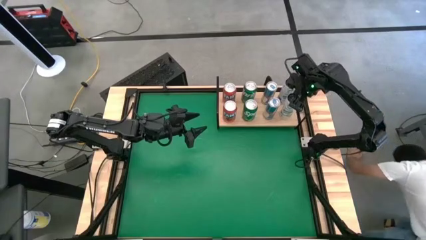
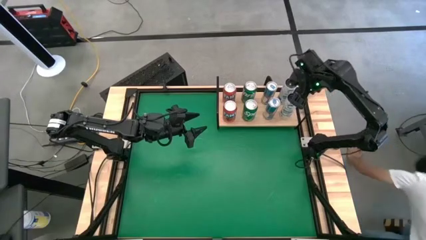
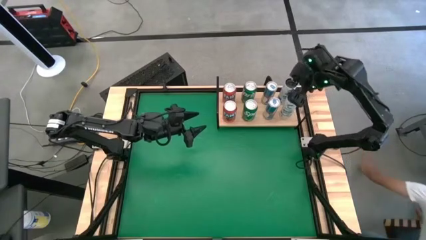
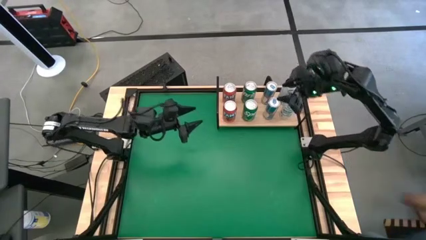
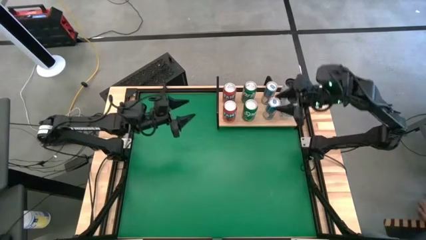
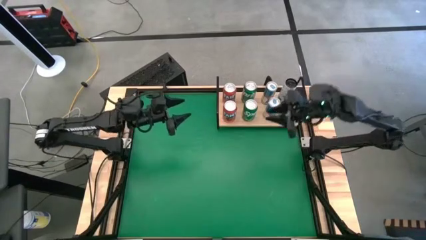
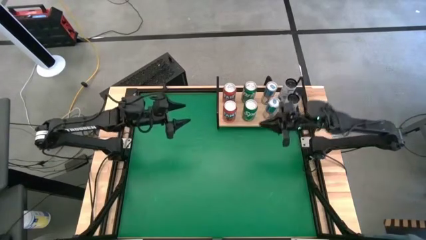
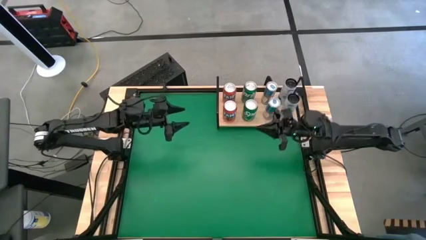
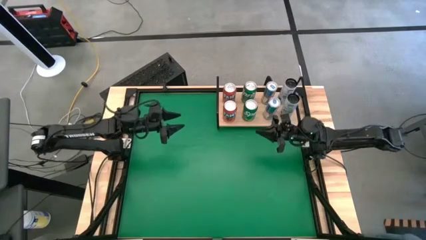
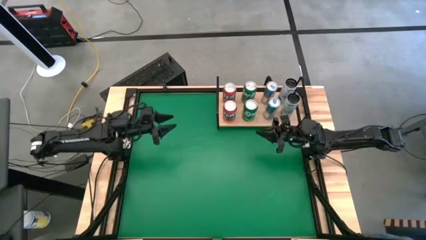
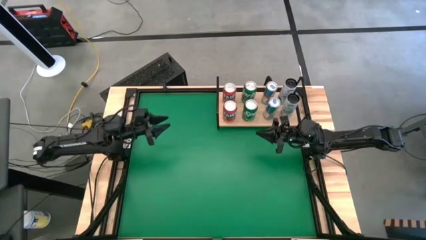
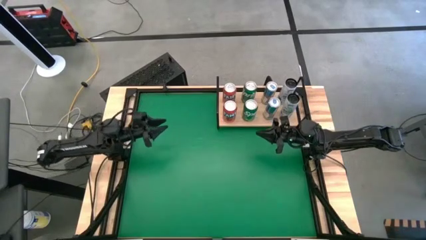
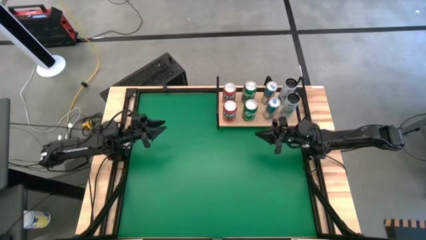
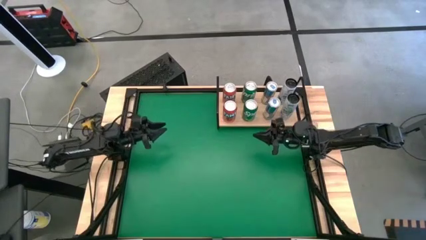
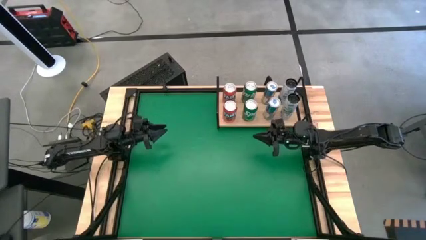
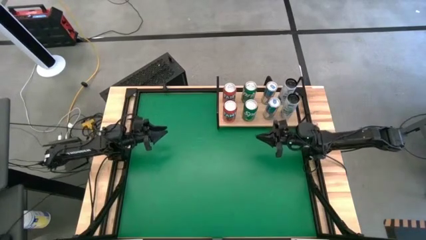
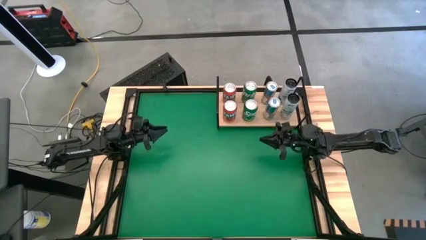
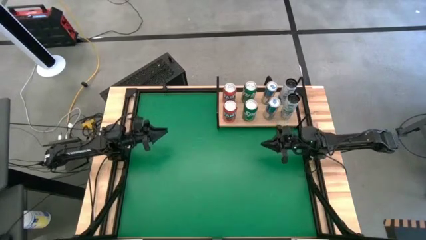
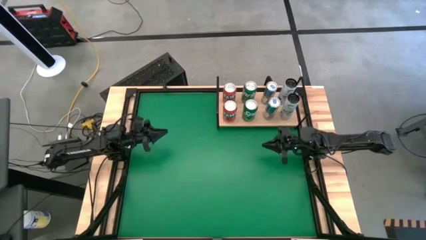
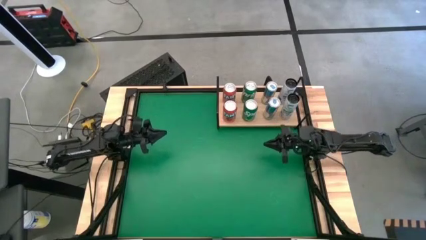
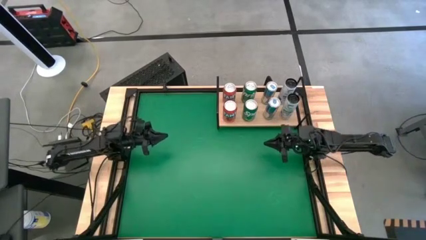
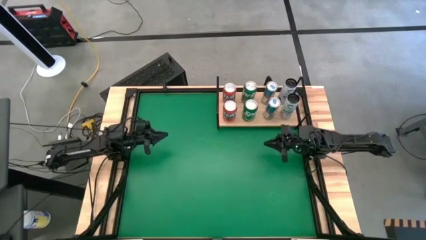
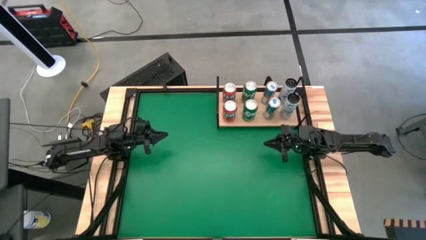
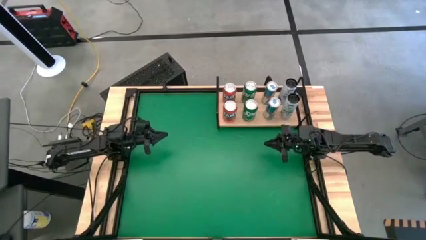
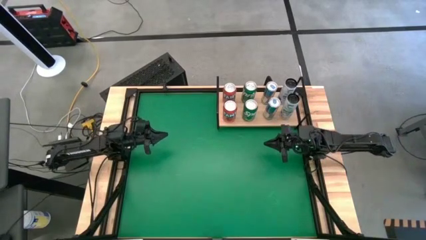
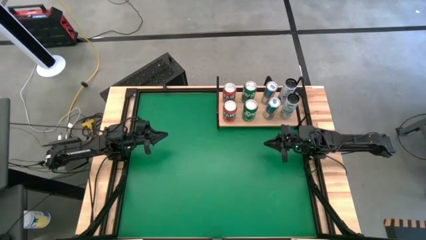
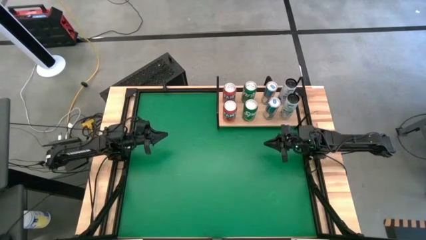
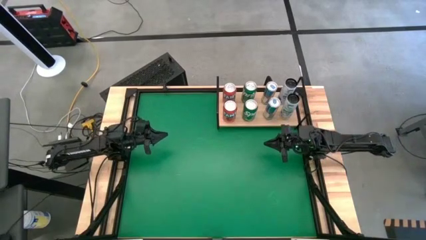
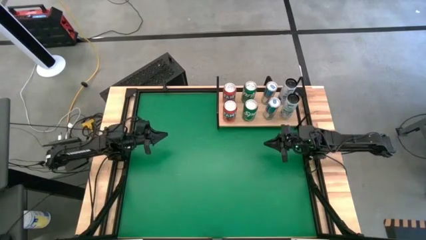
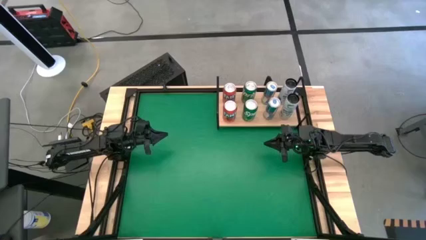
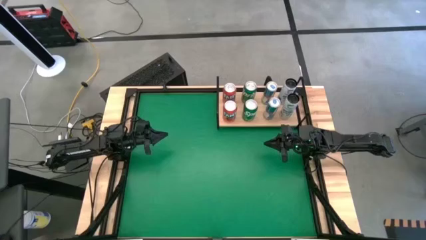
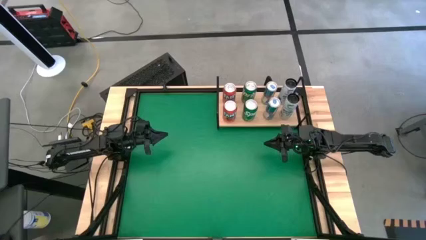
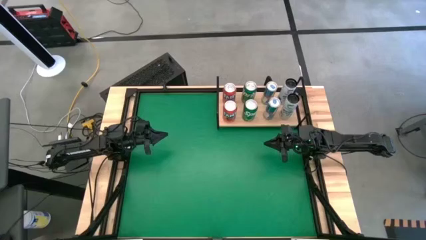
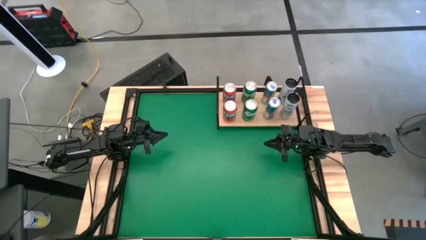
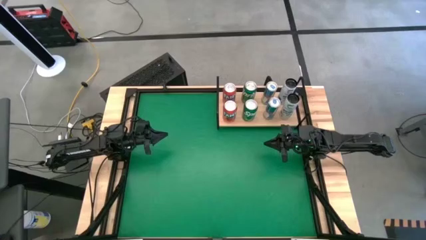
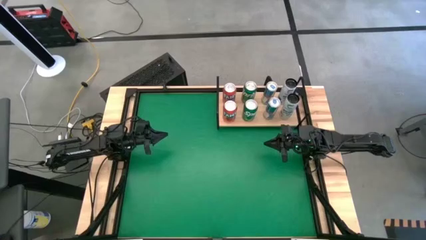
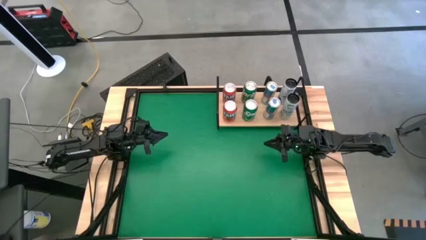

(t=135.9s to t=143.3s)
Task: Place canned beverage on shelf
Return to Home Position

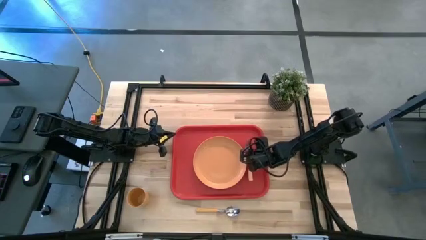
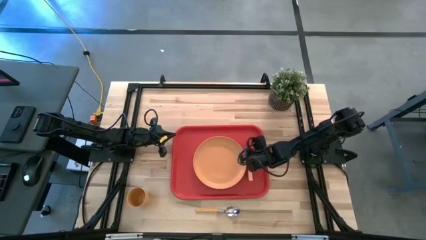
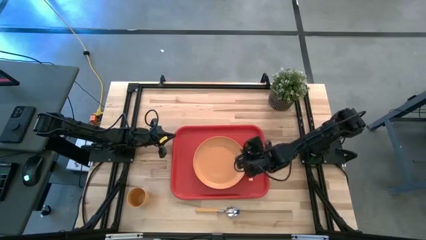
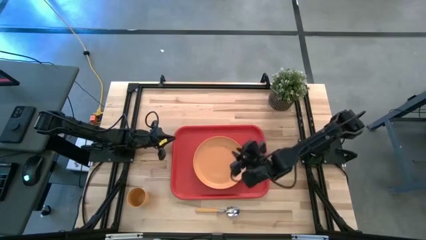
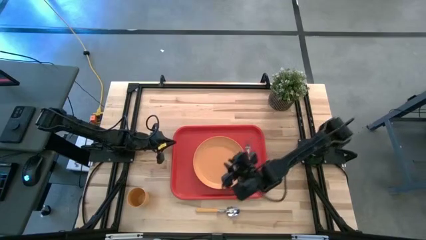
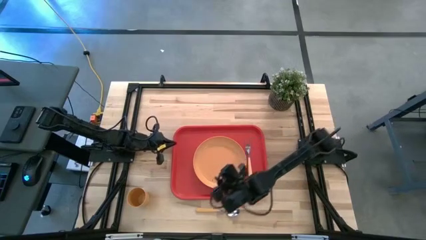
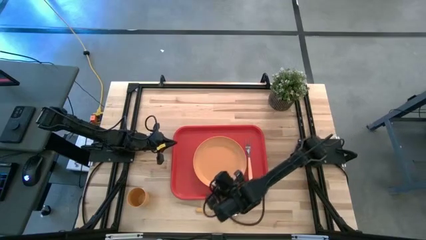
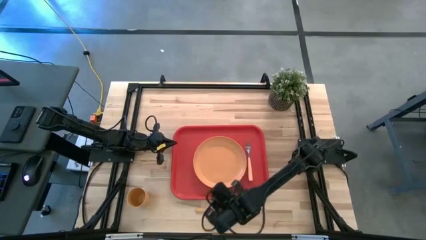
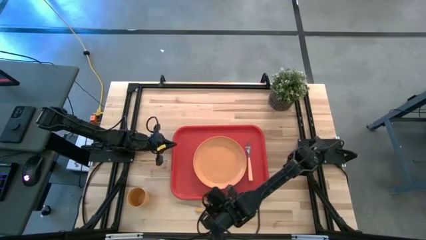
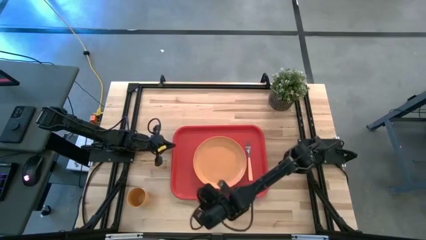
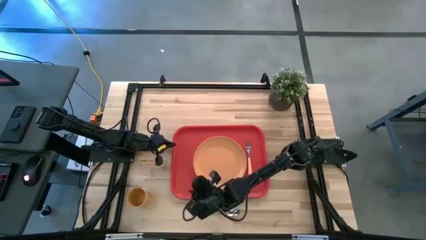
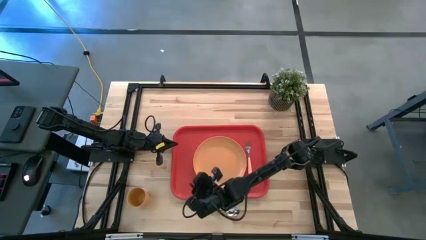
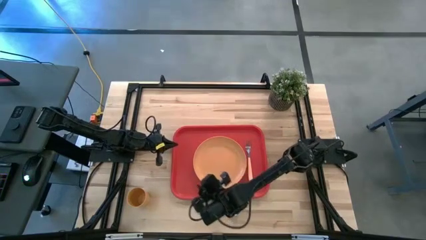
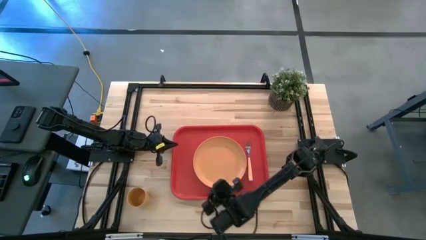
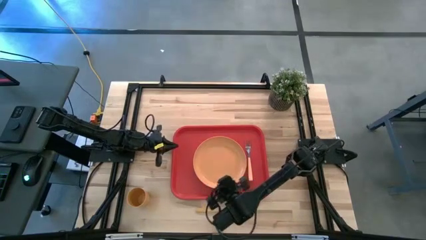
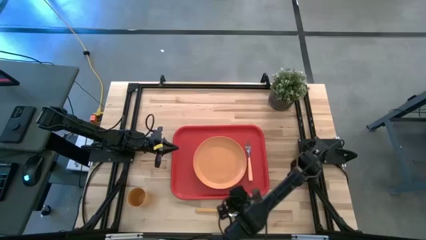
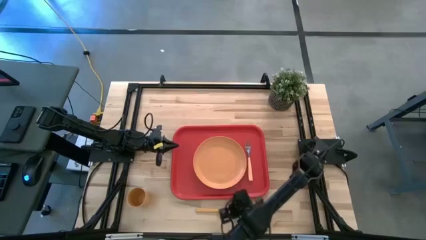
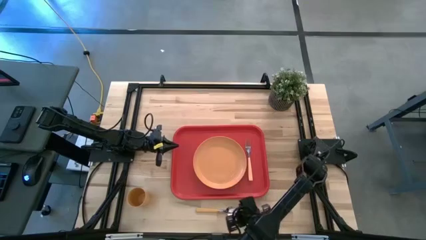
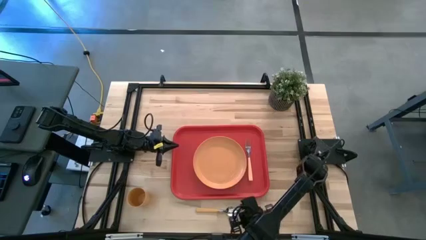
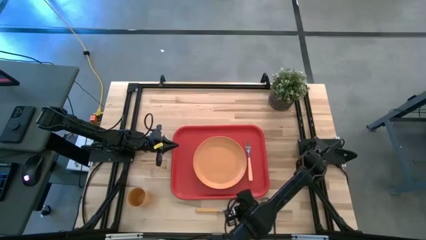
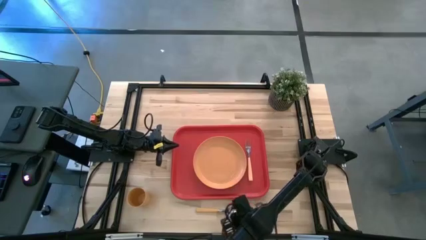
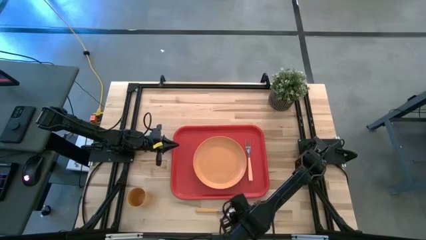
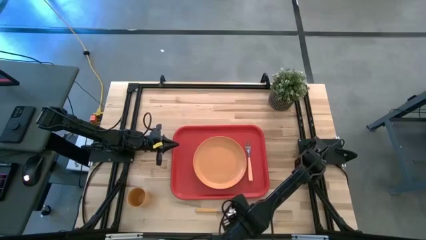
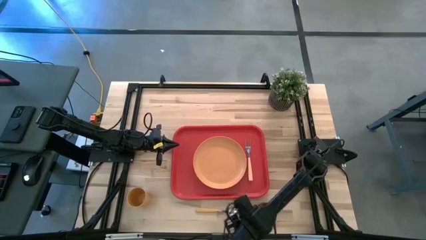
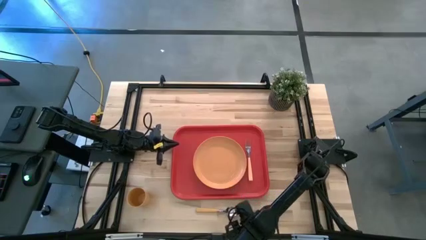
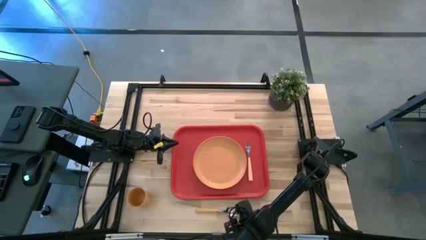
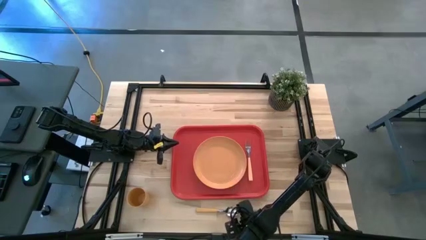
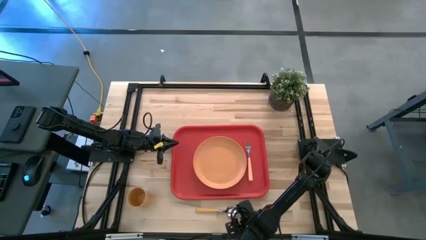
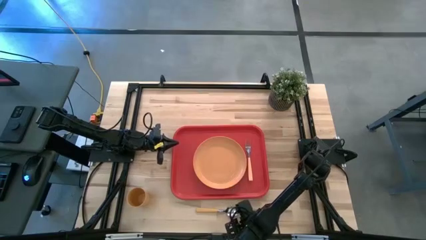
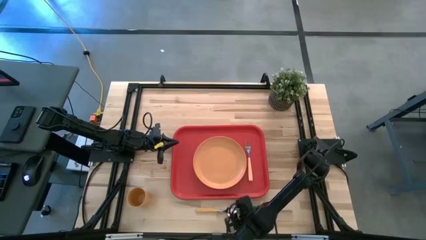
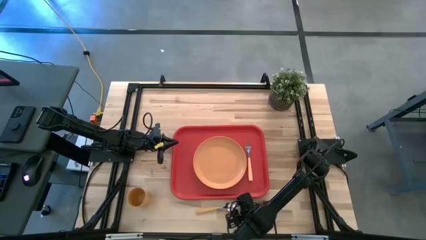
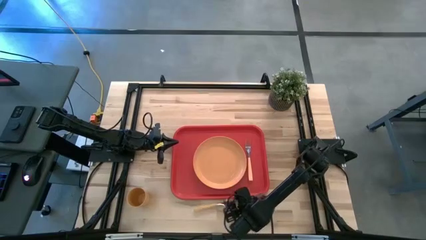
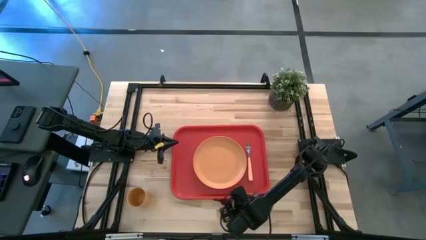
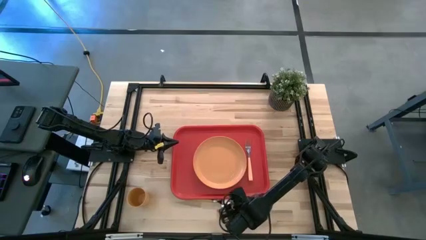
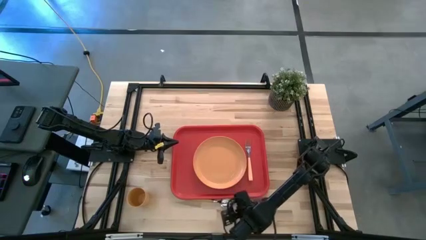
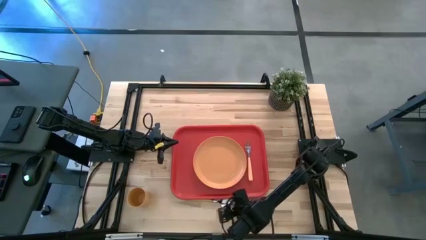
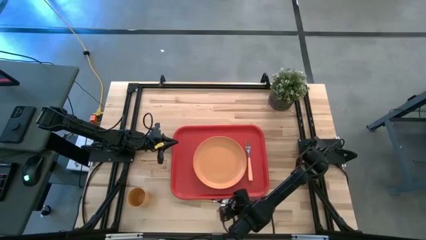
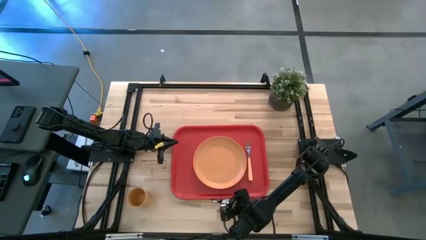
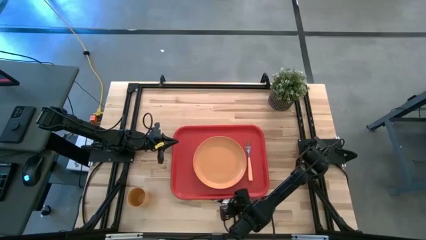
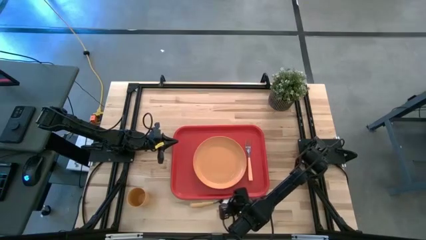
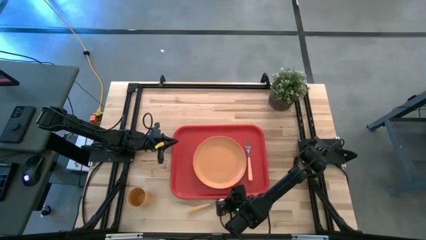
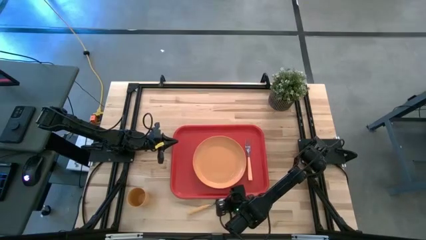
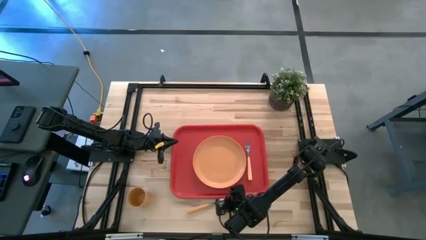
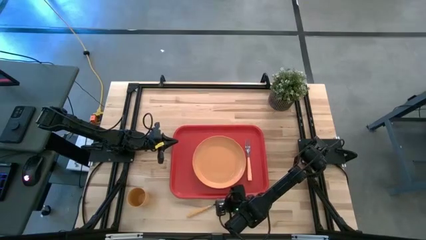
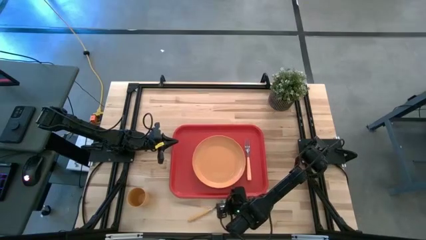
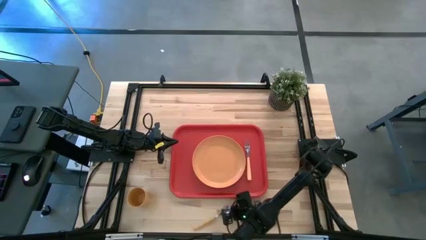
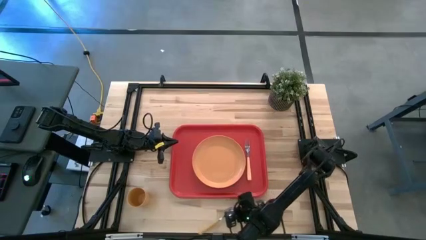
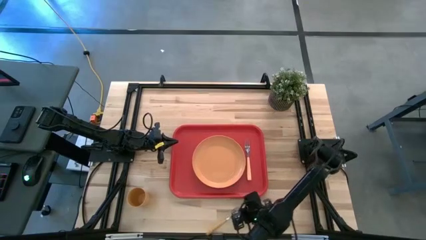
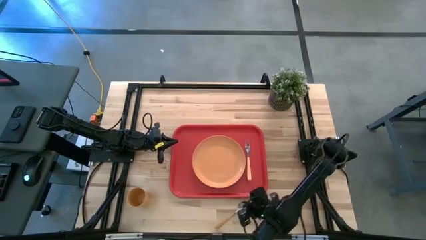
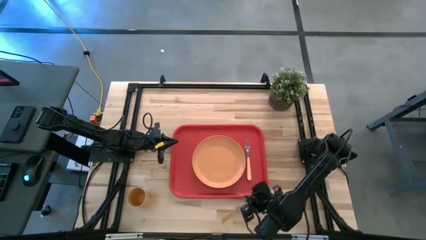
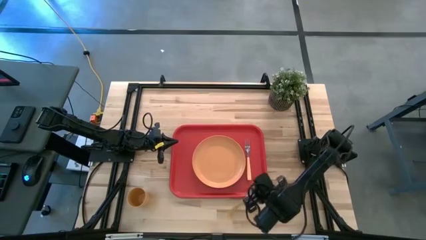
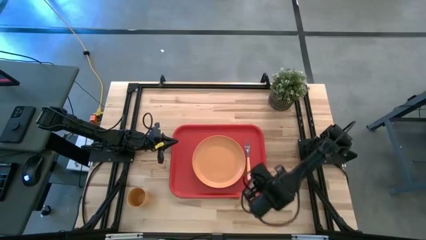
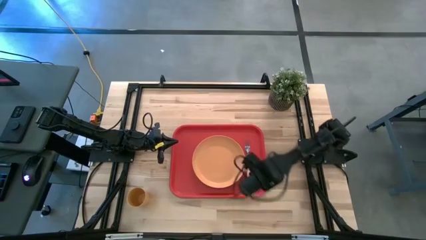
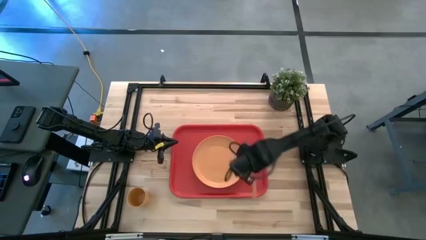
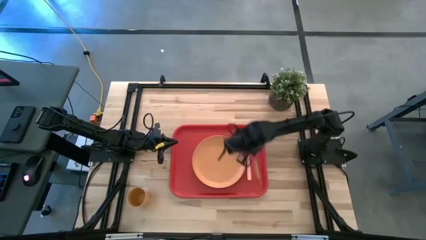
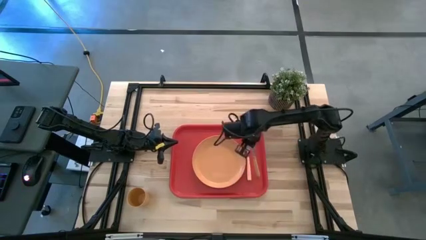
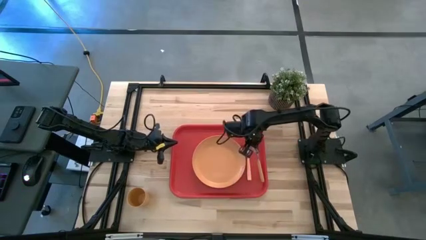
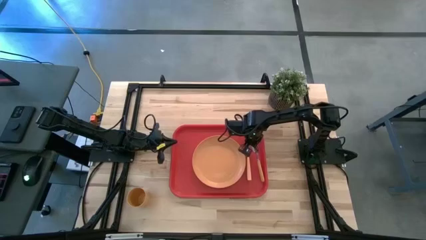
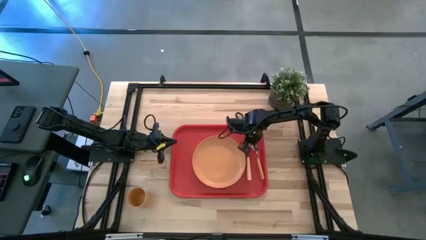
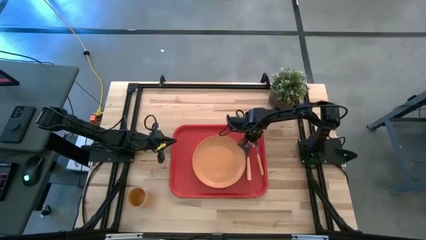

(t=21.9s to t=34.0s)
Task: Pick and place plate/cup/fork/spoon on tray
Put the orange spoon on the red serving tray to the right of the orange fork
